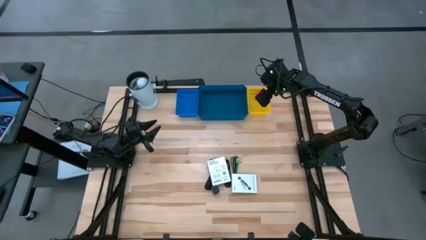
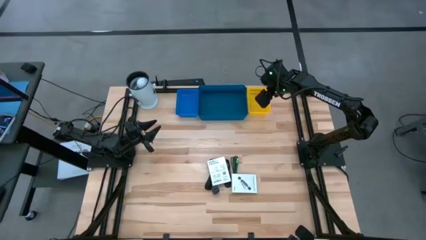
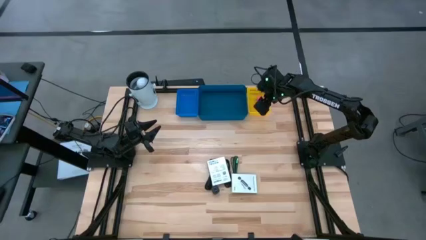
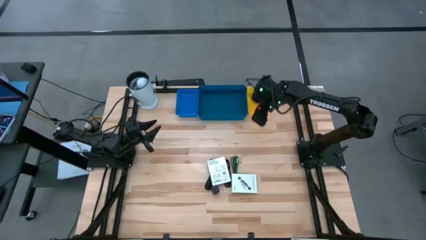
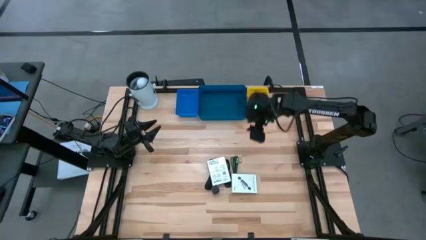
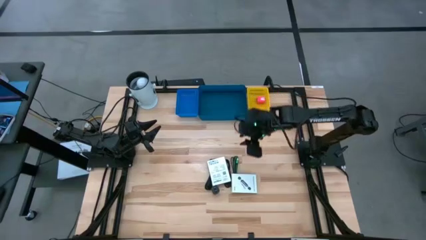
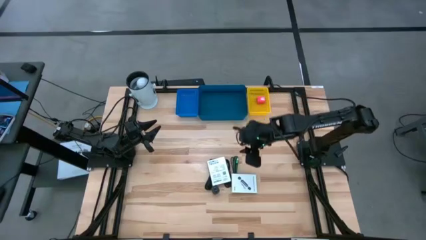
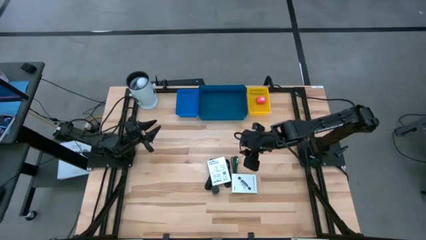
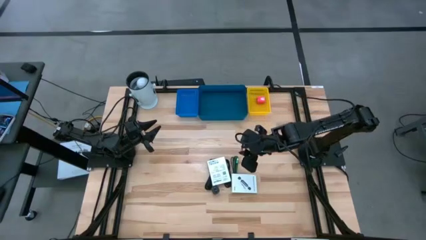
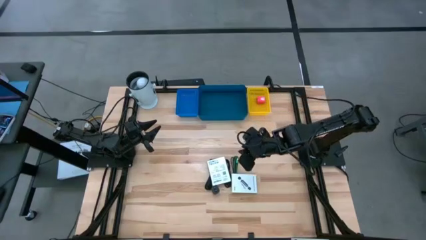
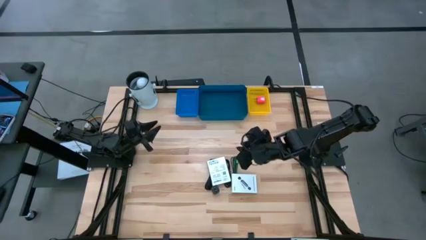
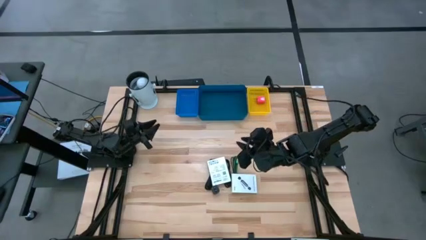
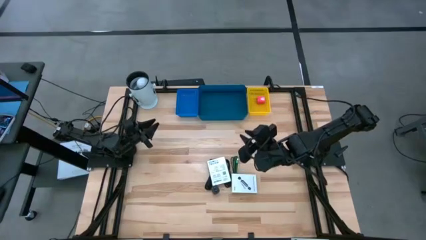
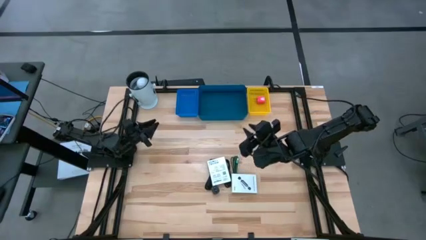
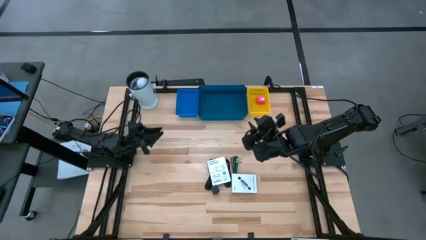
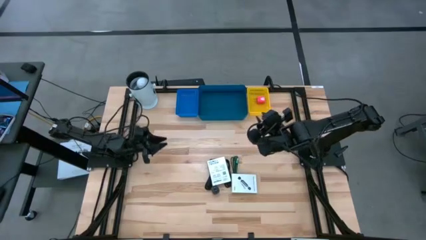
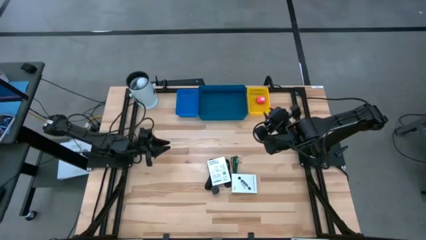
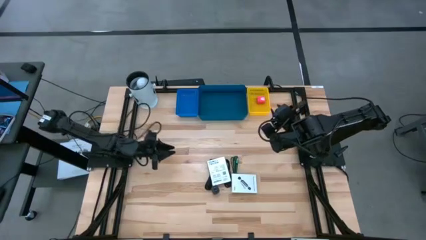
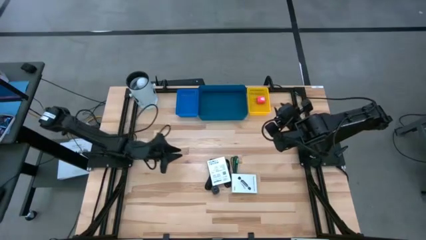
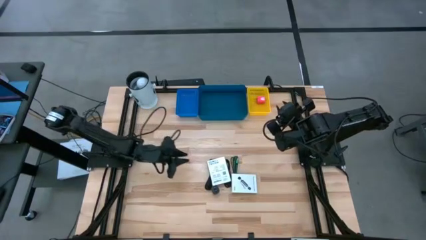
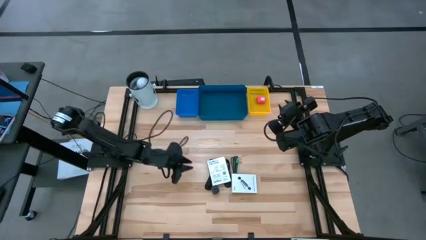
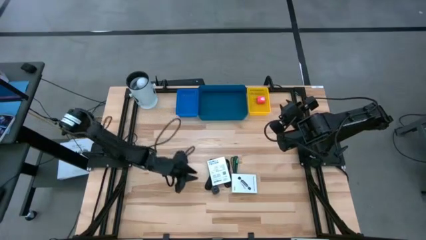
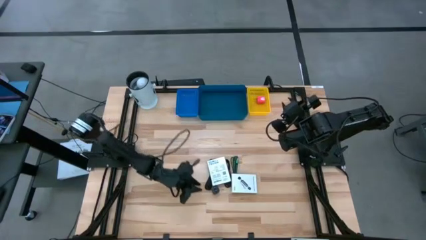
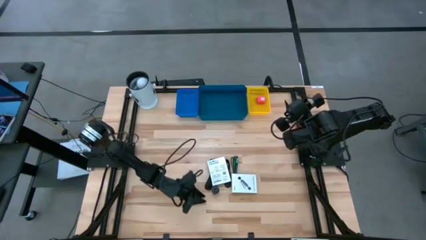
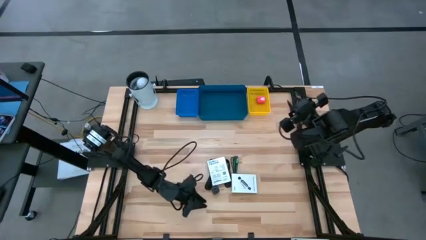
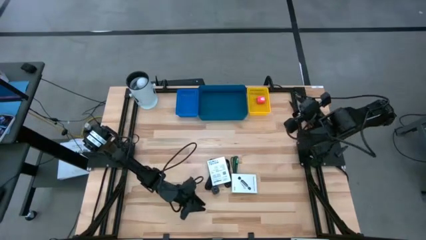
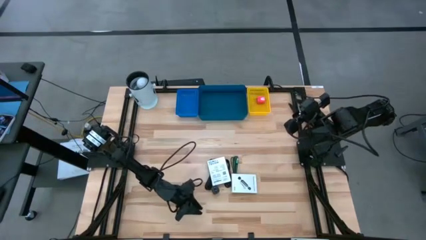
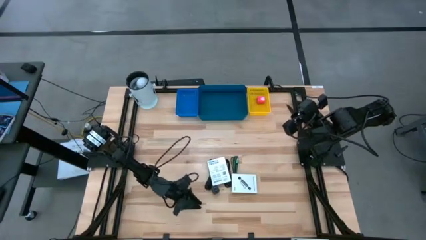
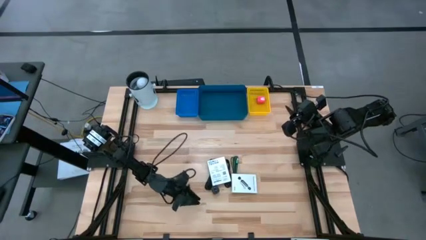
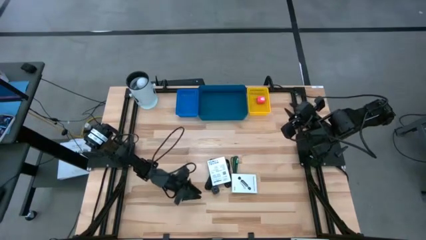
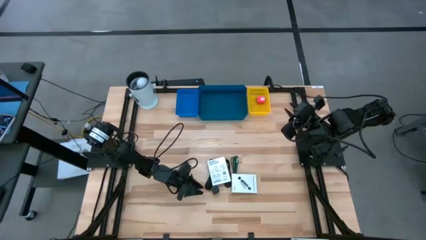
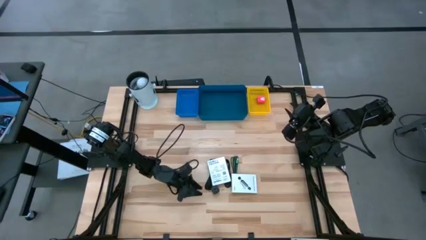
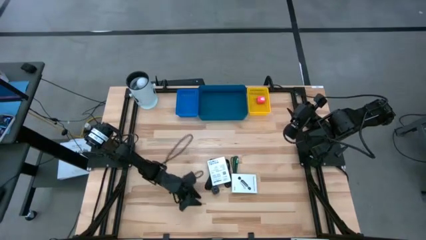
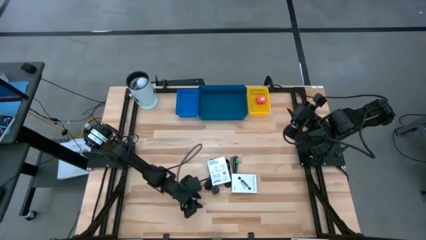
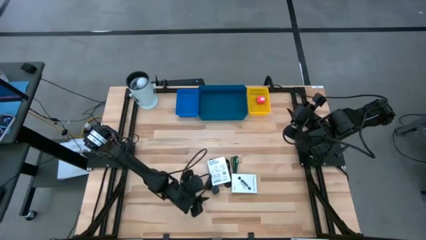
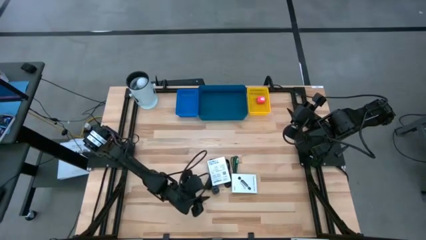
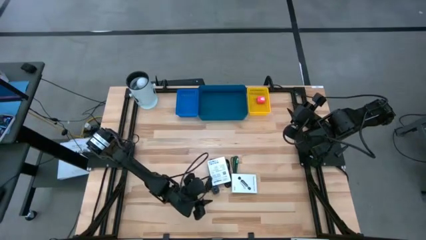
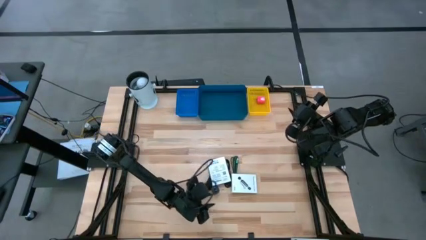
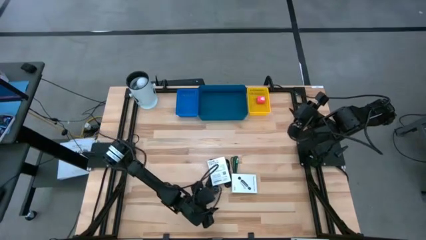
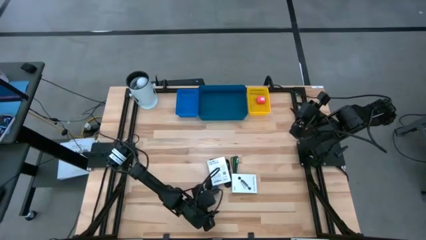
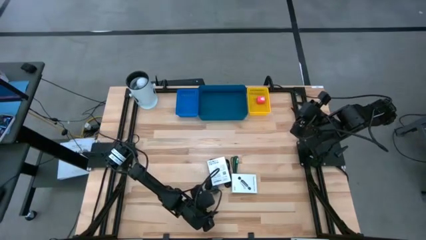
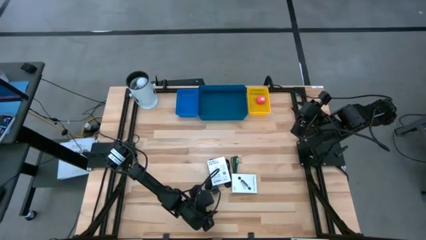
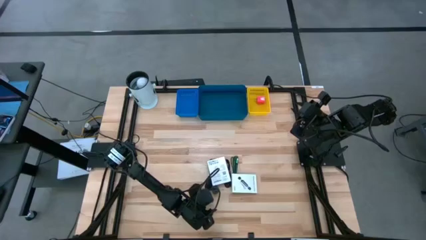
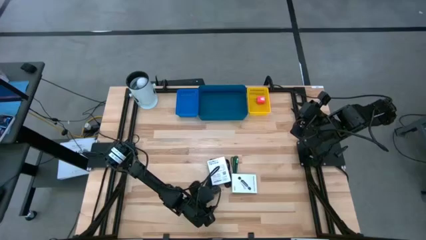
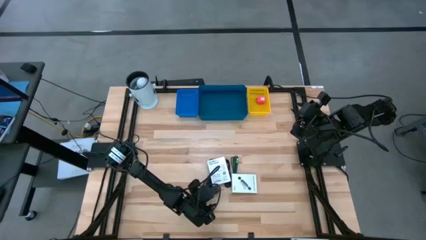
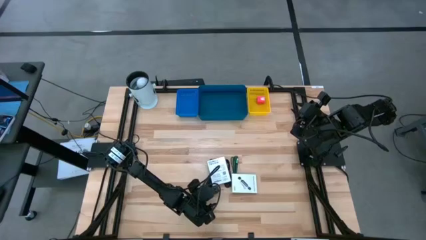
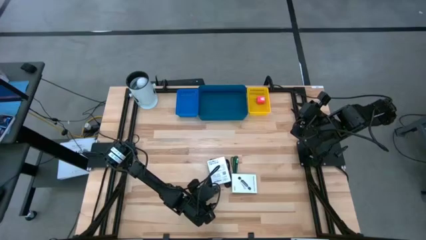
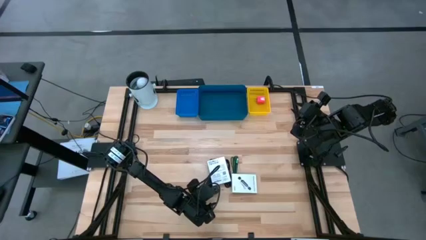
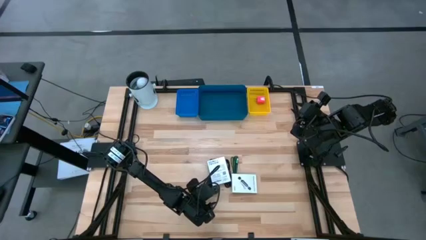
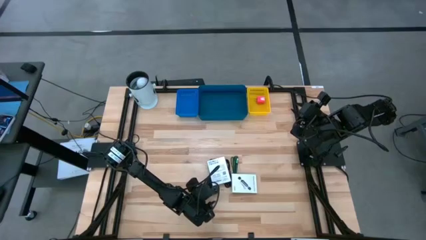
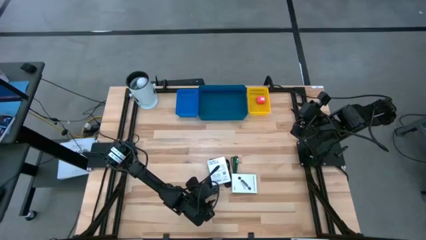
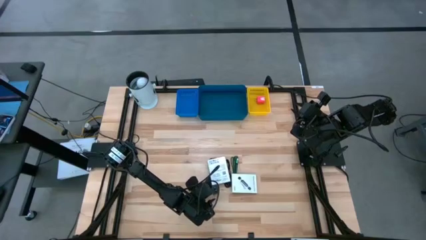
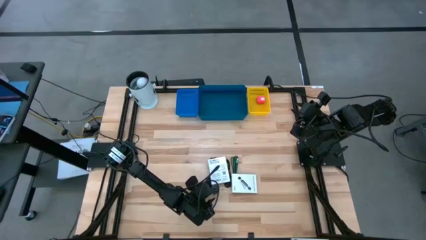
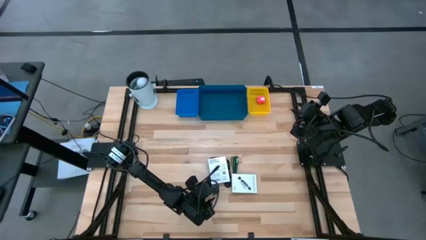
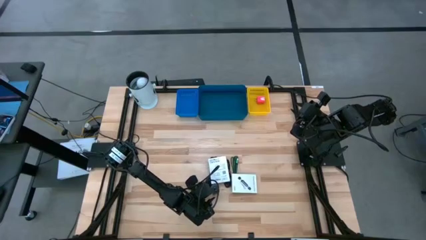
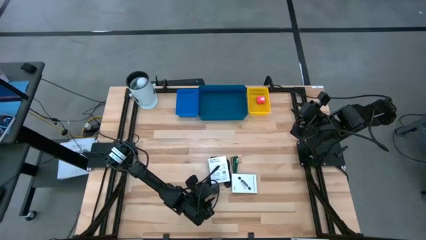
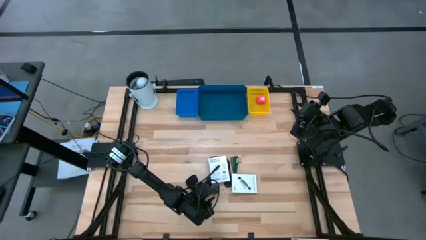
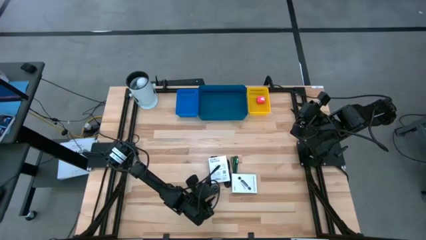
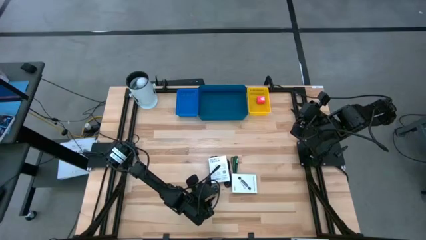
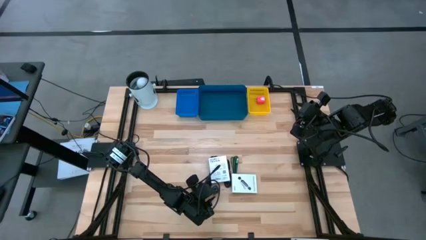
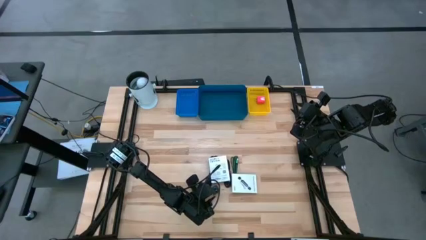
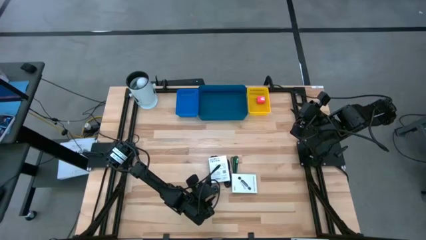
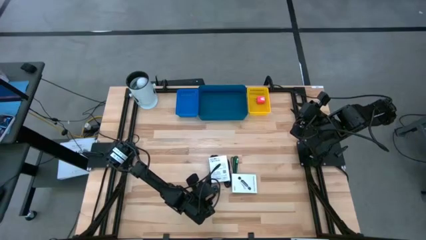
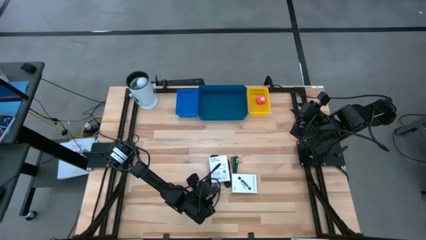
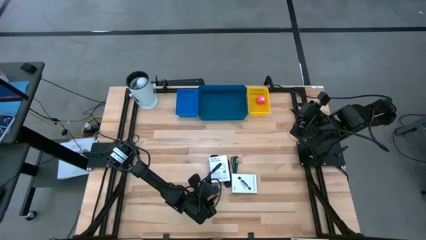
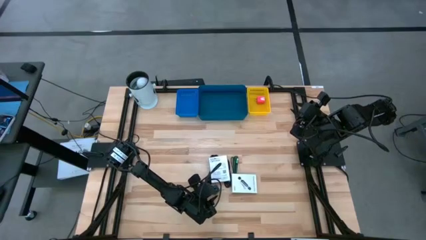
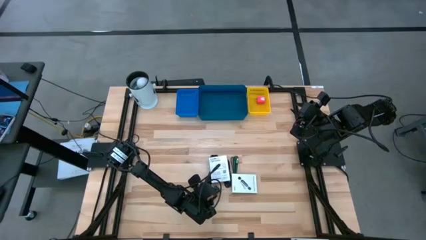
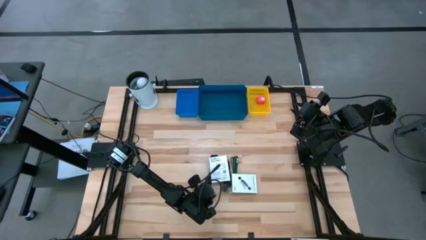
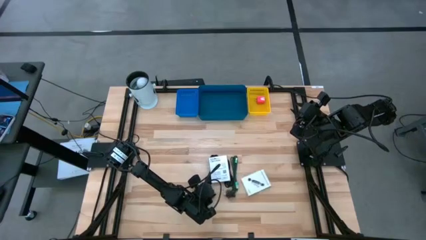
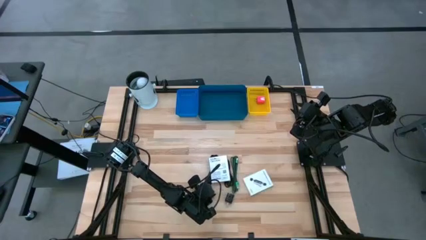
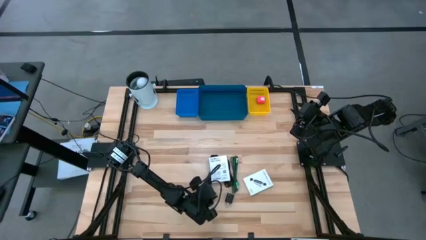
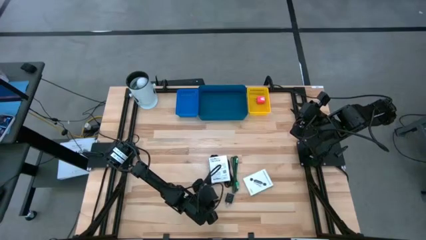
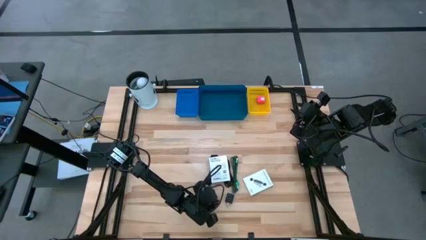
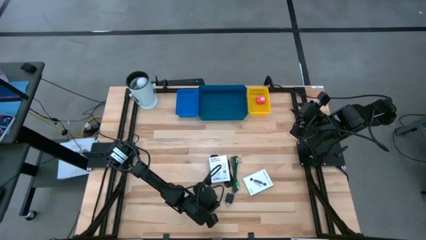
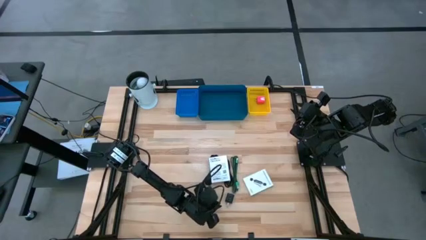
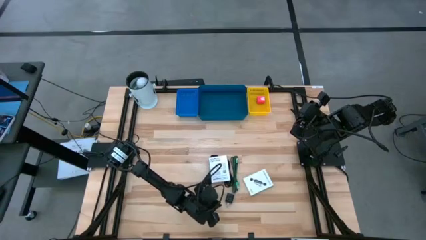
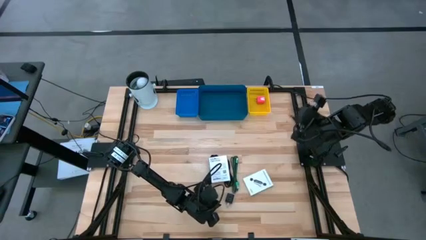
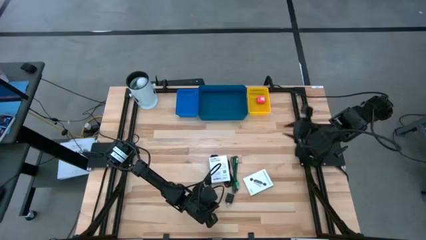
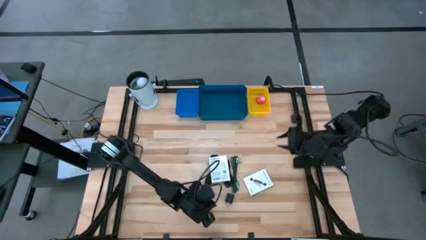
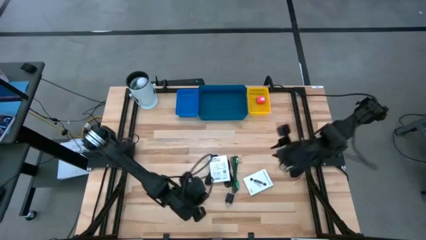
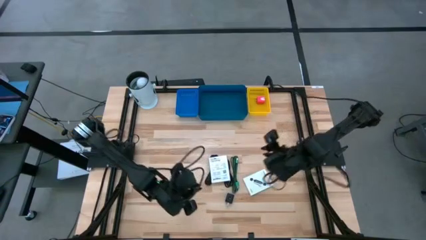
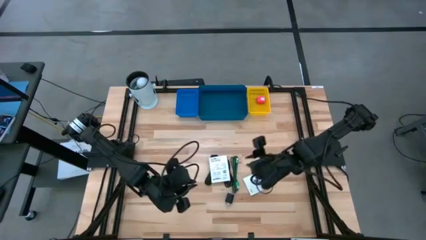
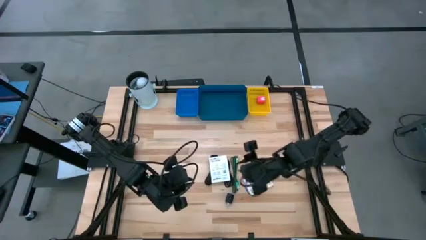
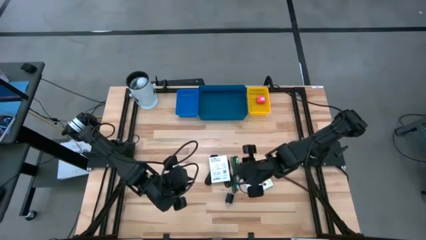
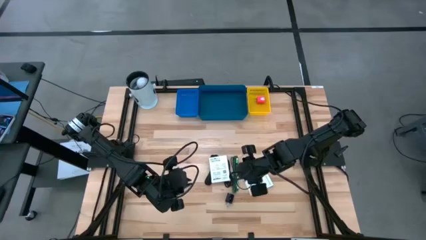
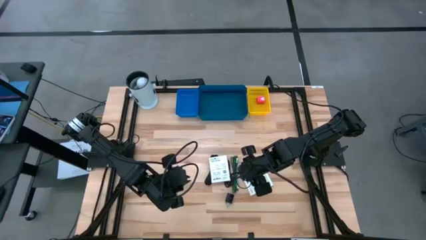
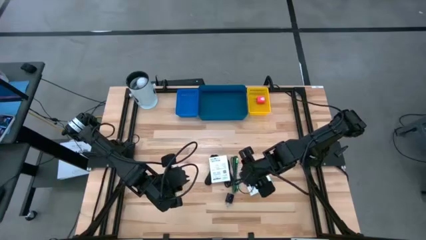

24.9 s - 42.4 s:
Task: Pick and place items into bin
Put the black charger adapter into the yellow basket
